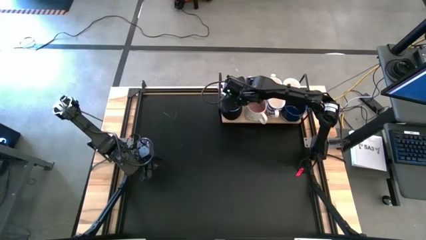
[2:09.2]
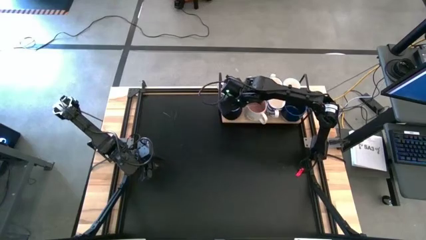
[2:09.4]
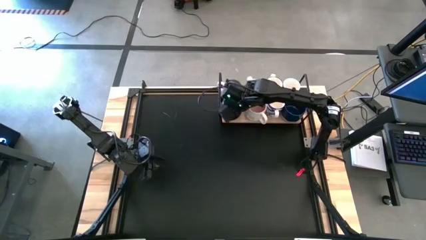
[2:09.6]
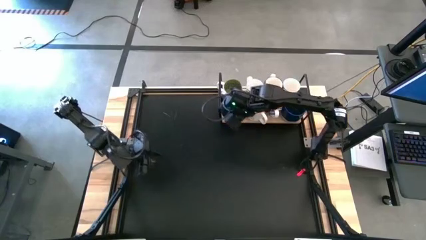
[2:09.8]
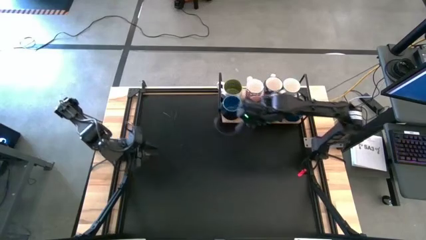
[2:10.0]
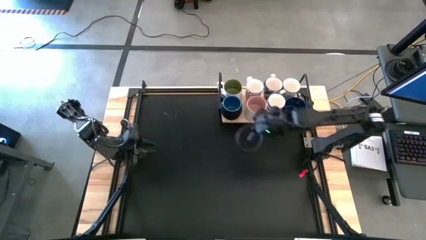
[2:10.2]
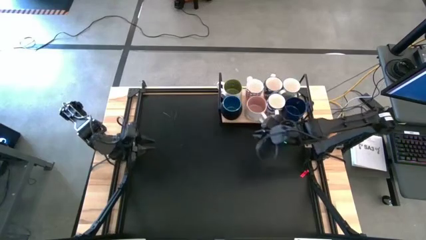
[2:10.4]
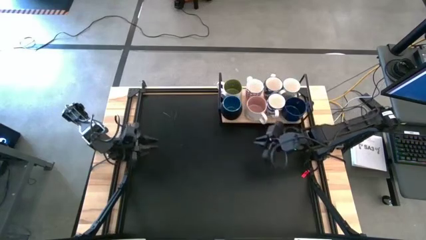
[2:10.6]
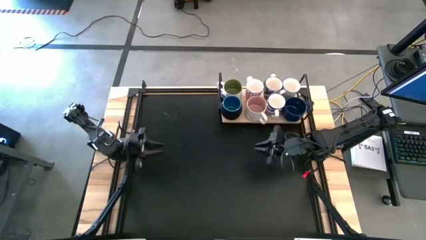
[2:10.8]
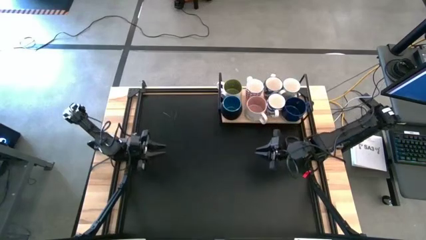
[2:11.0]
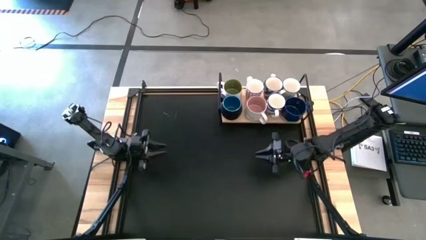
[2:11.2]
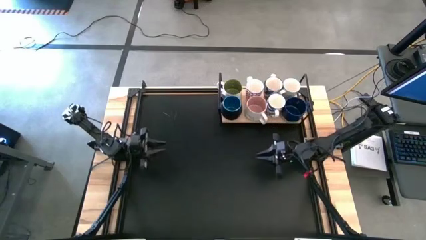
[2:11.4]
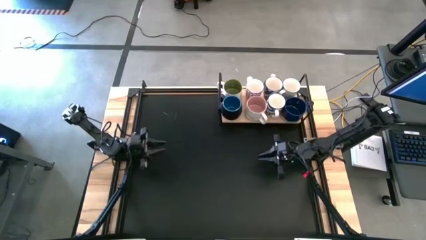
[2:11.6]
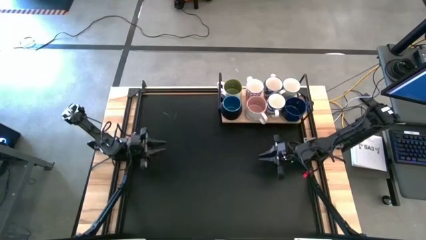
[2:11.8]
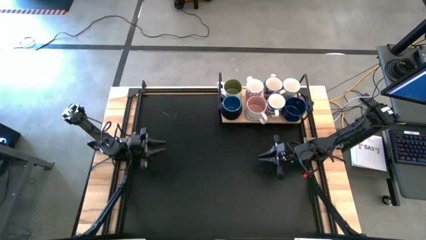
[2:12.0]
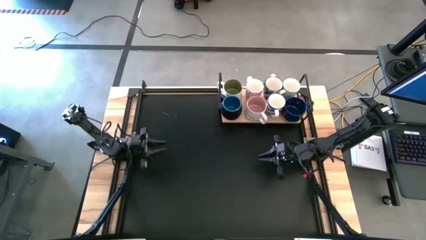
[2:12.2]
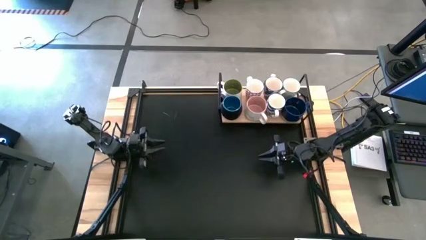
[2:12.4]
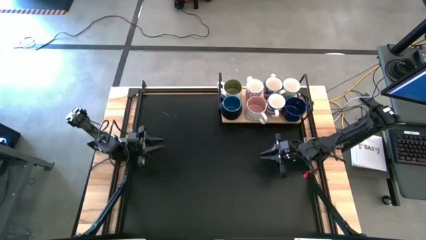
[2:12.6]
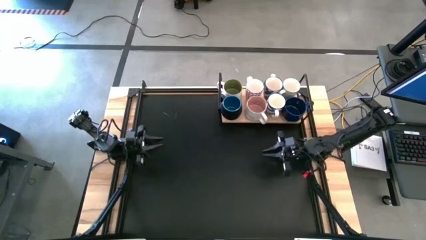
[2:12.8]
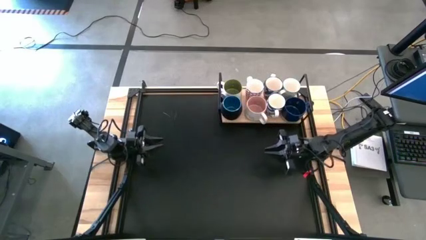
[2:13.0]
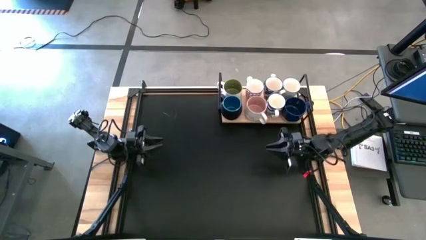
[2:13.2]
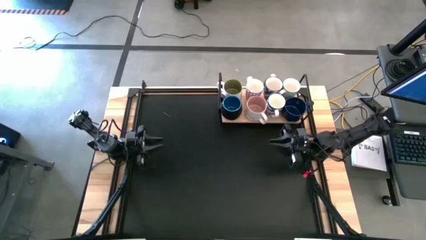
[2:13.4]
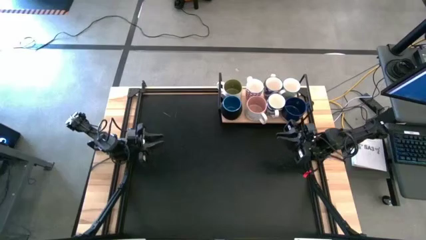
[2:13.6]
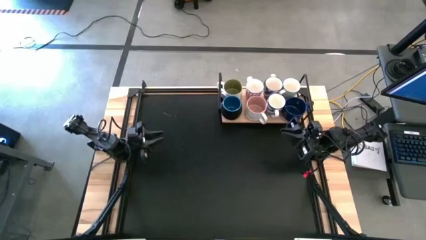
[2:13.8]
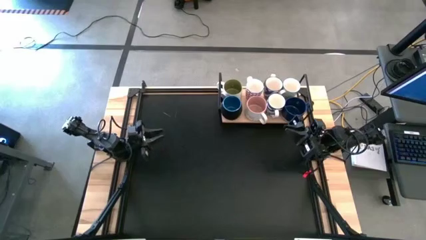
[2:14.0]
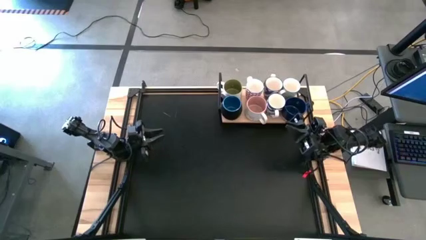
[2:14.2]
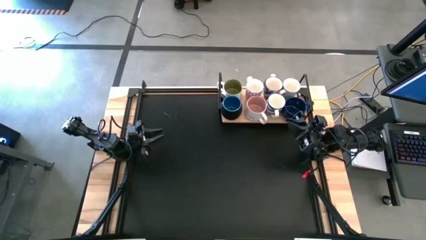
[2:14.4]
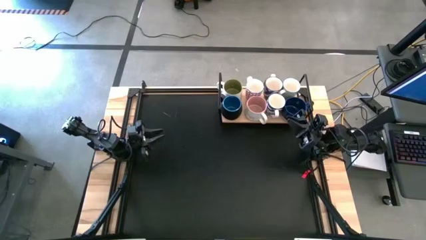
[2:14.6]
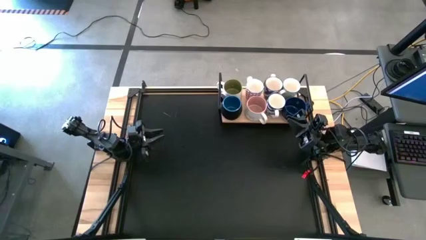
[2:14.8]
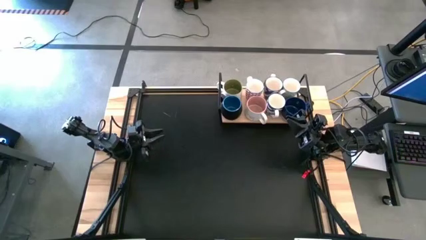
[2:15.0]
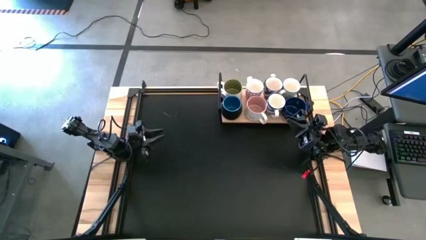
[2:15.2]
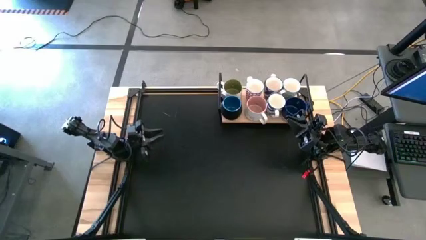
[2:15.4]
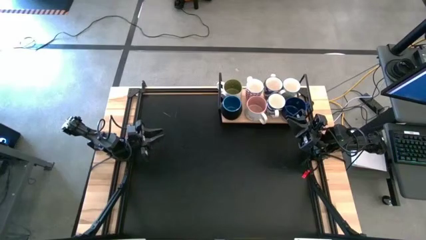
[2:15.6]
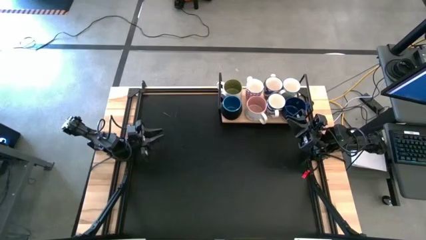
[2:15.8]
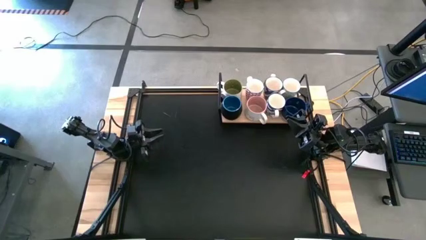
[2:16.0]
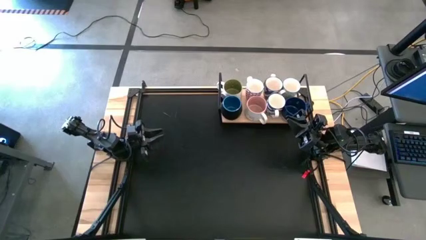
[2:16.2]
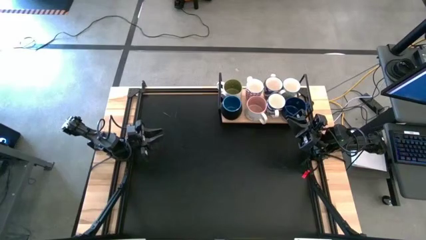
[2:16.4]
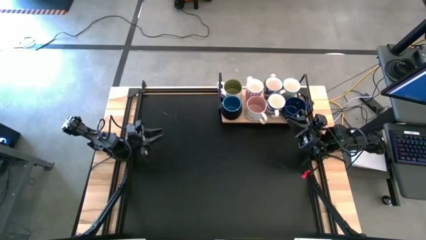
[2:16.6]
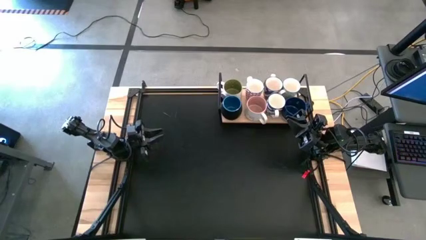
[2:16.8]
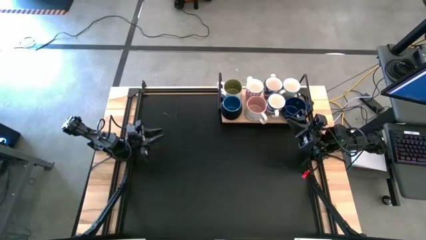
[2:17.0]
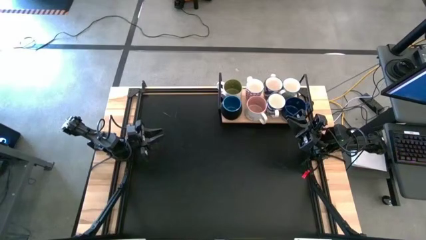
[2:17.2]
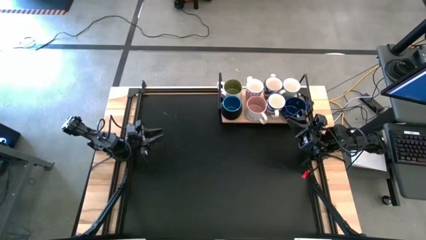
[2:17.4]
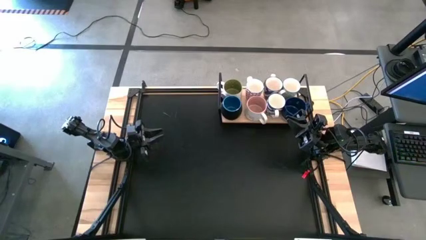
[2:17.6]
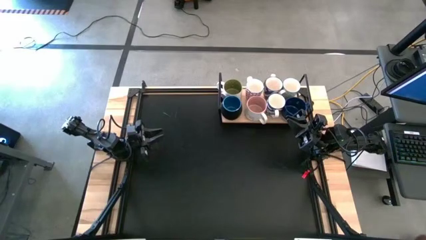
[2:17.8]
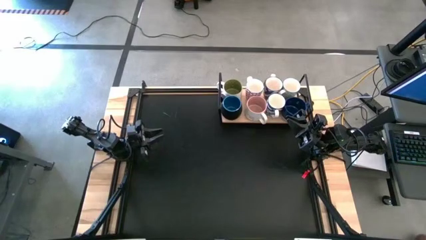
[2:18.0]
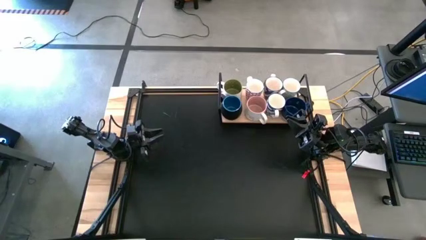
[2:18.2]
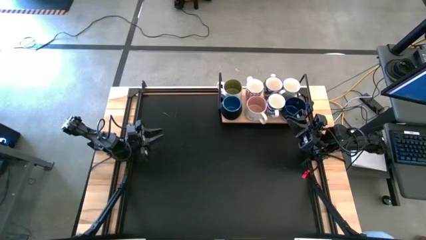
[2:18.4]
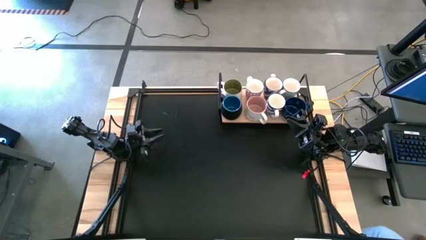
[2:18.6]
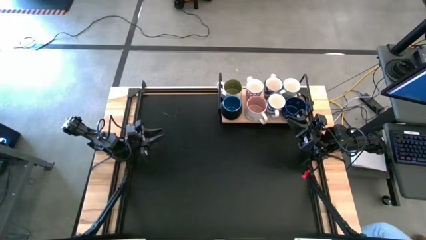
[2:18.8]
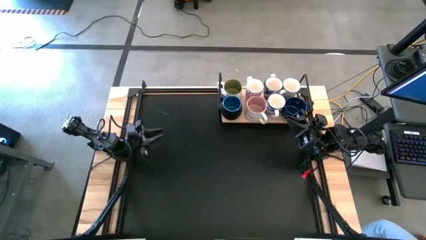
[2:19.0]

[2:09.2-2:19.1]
Task: Place coffee mugs
Return to Home Position

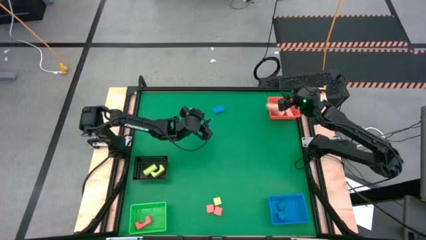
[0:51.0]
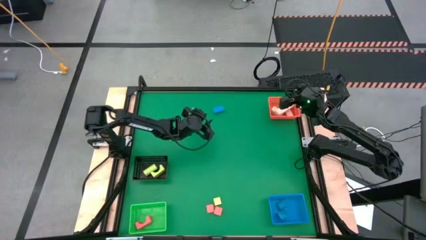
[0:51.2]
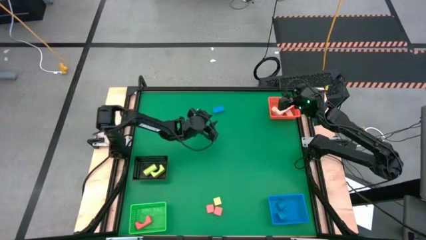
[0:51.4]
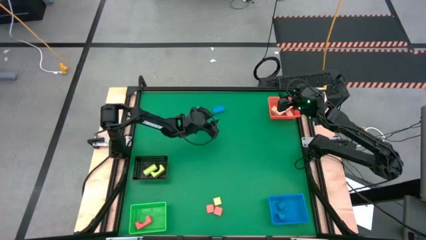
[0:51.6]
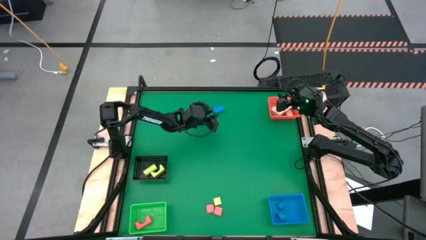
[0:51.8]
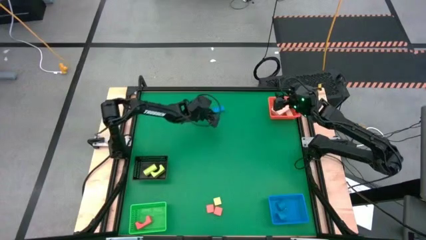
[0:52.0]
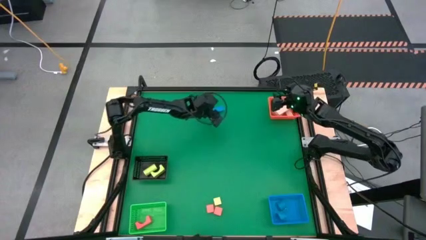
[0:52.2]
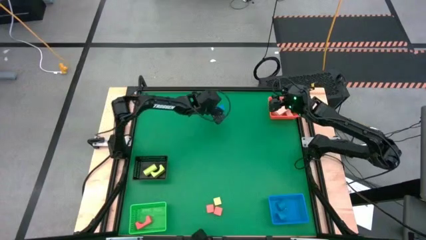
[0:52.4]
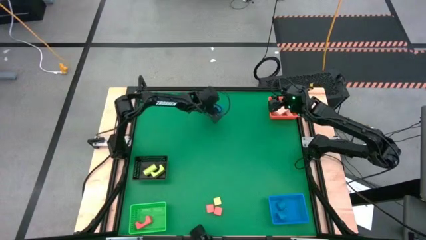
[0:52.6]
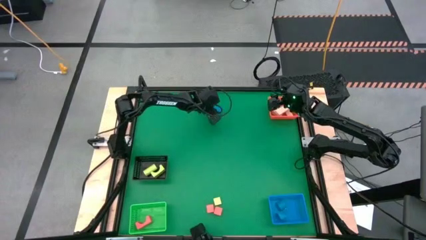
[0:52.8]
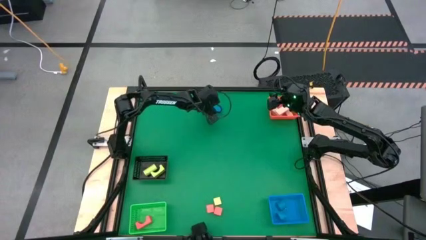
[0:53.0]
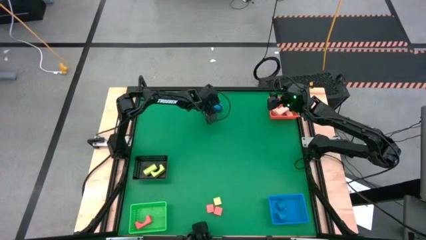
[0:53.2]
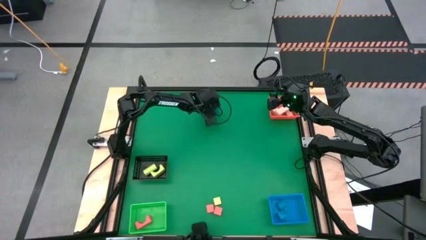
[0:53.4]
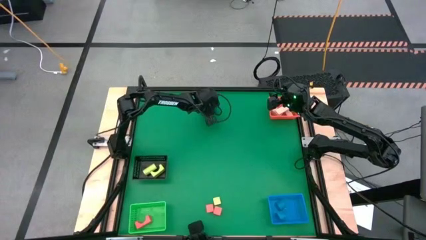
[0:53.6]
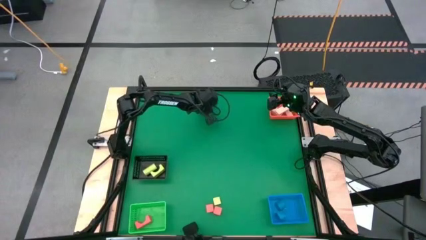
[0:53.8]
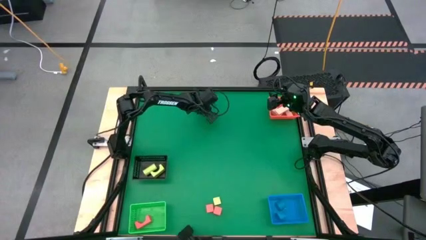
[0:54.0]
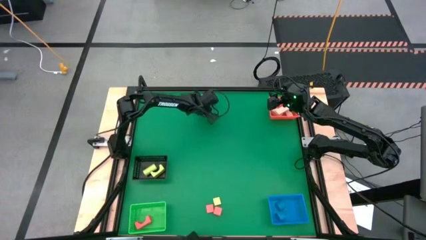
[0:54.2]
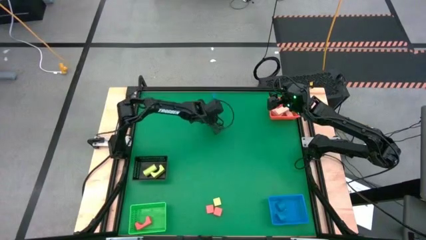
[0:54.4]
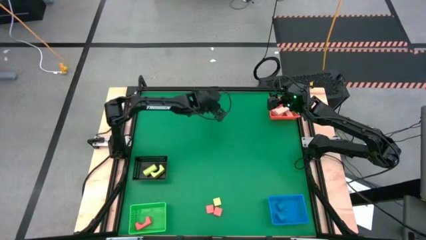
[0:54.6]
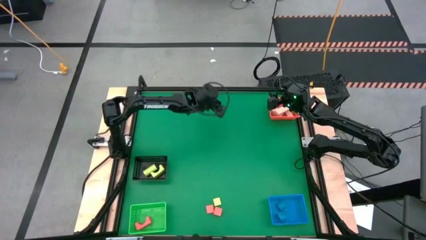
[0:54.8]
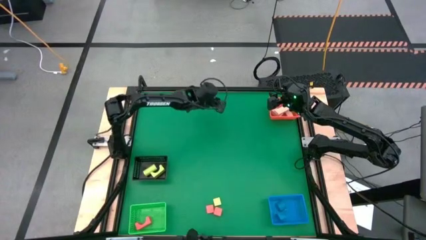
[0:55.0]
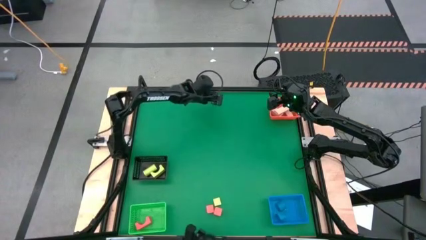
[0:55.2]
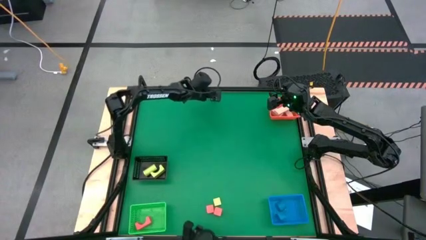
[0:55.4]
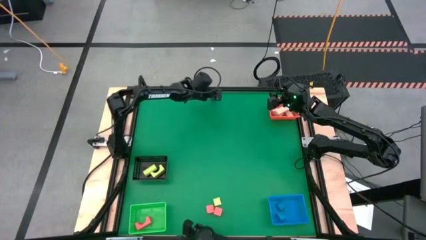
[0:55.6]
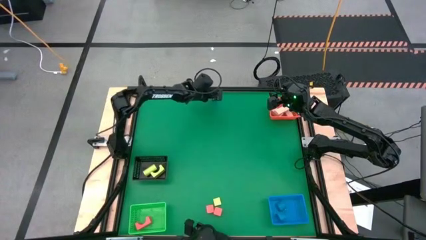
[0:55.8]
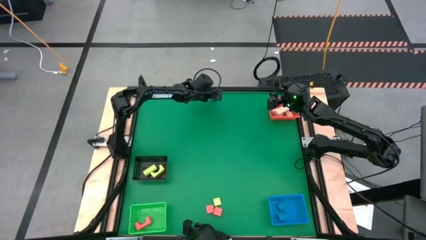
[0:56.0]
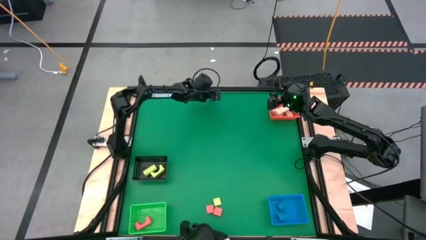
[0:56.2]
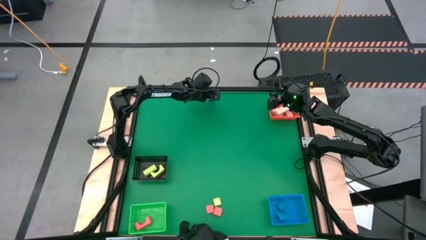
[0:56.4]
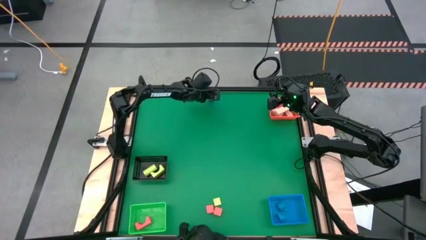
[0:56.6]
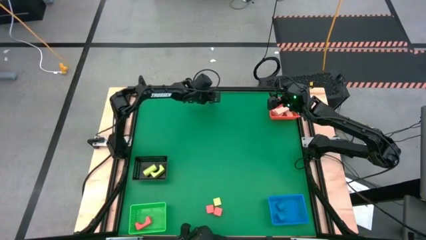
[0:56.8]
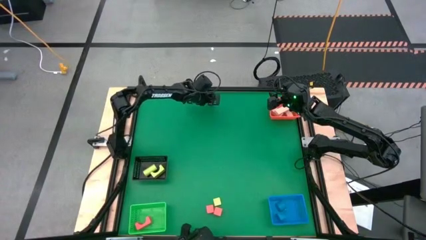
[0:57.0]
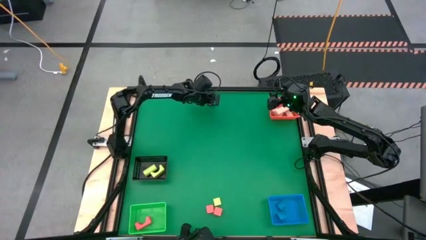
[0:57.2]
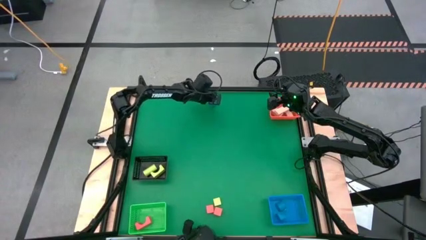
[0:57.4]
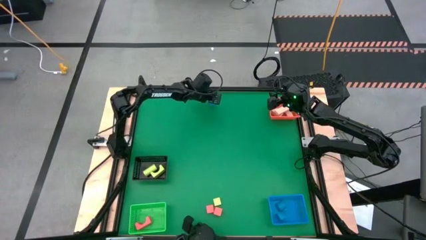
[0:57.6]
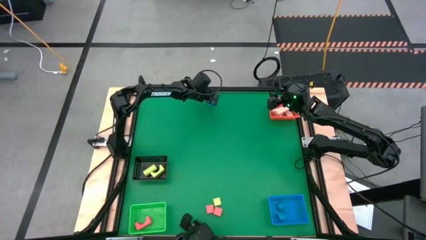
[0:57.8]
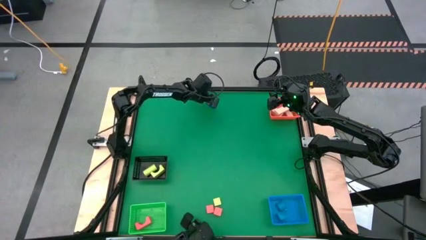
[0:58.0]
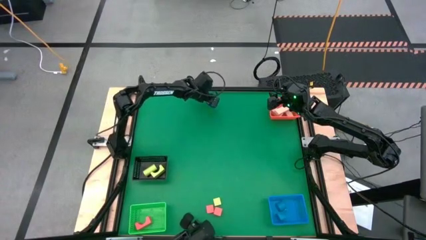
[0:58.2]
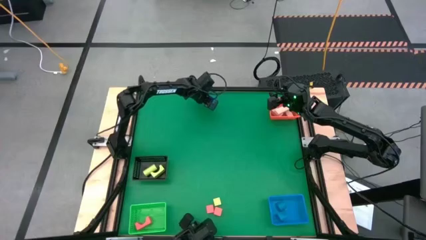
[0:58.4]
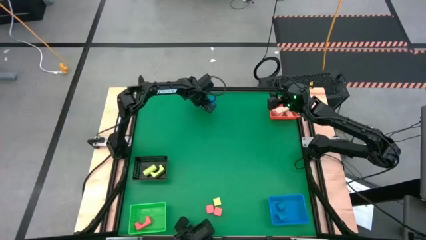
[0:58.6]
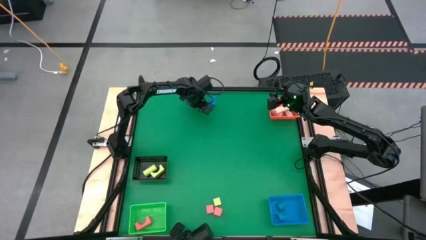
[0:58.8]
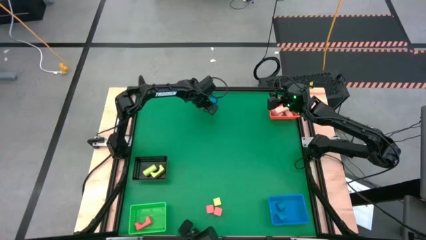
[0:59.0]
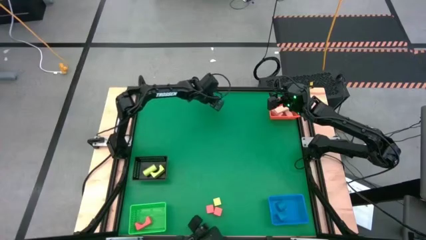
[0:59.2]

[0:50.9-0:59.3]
Task: Sort & place blocks by color
Put the blue wooden block into the blue basket
